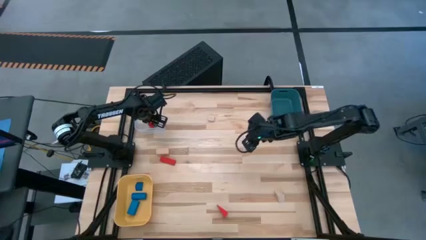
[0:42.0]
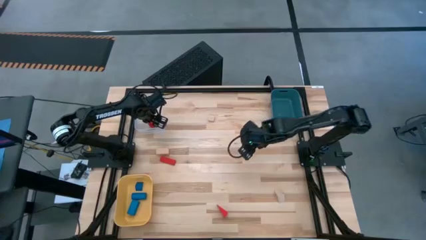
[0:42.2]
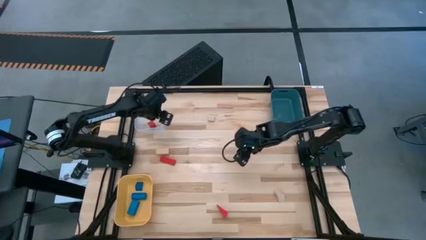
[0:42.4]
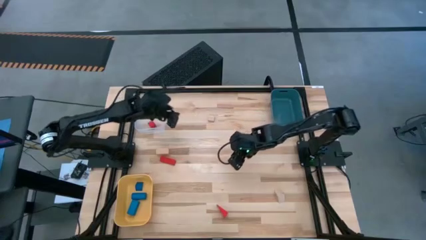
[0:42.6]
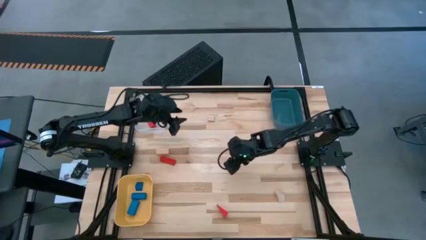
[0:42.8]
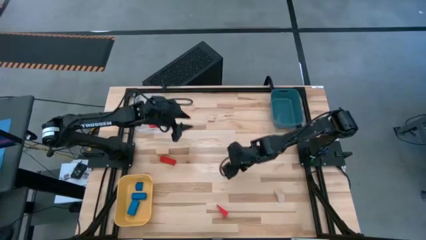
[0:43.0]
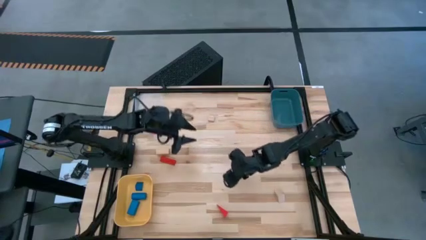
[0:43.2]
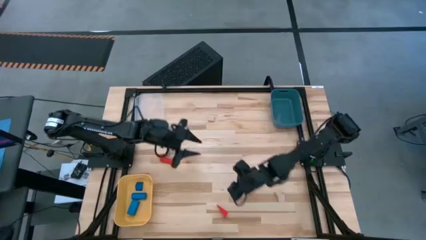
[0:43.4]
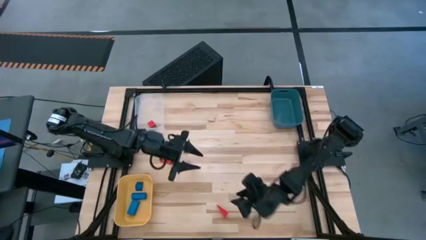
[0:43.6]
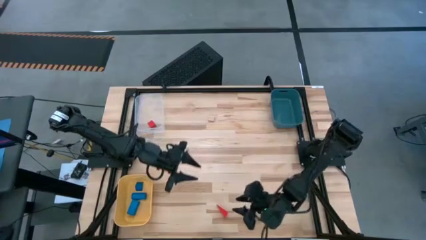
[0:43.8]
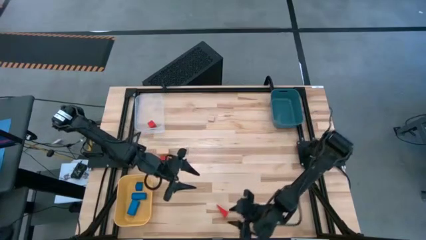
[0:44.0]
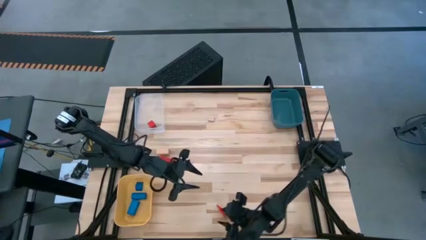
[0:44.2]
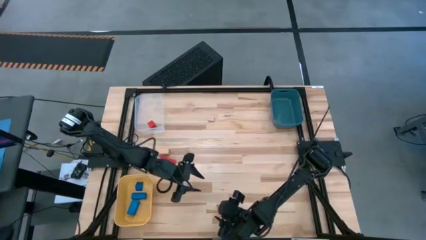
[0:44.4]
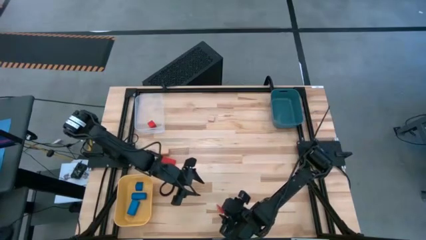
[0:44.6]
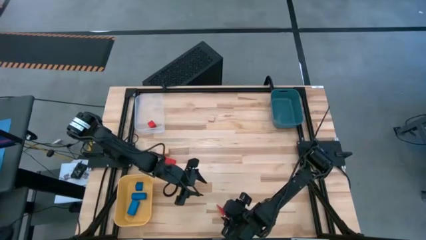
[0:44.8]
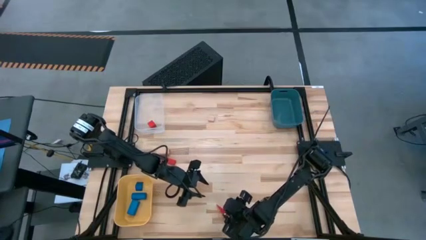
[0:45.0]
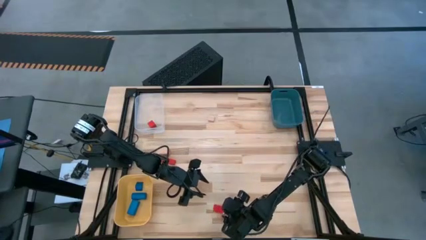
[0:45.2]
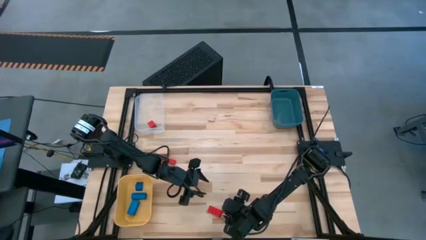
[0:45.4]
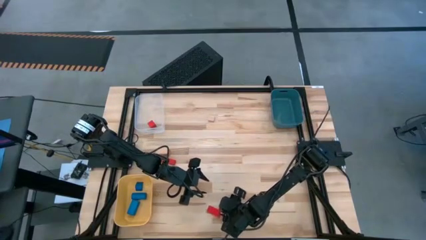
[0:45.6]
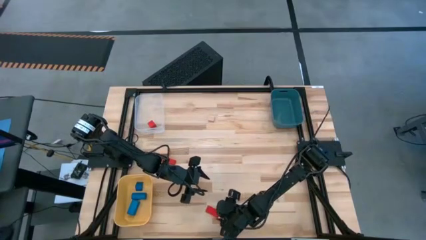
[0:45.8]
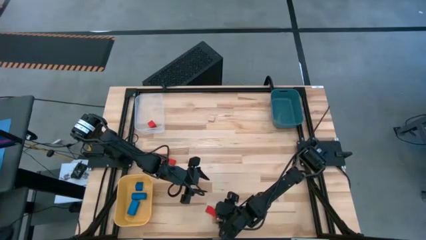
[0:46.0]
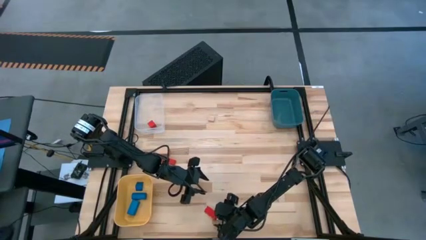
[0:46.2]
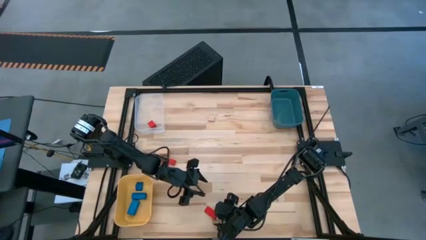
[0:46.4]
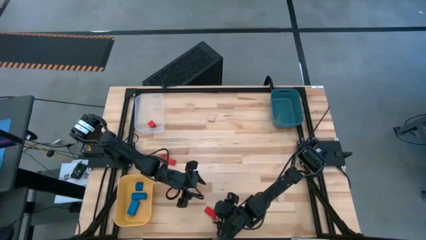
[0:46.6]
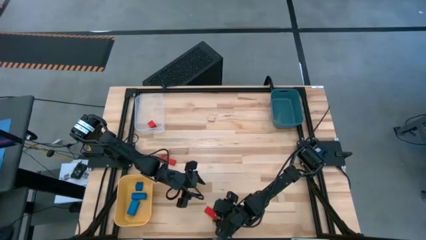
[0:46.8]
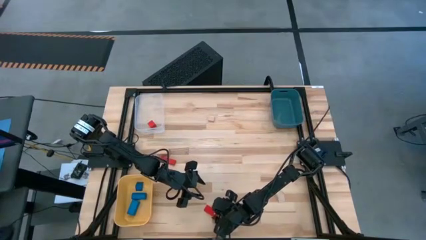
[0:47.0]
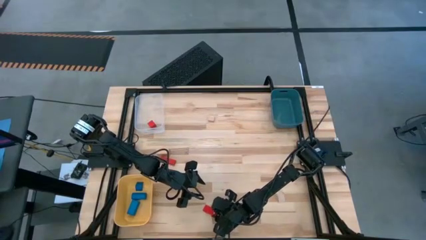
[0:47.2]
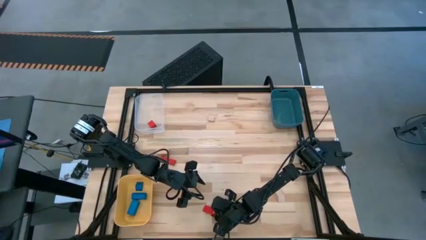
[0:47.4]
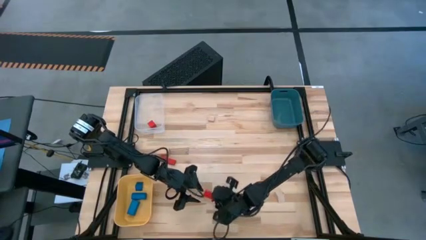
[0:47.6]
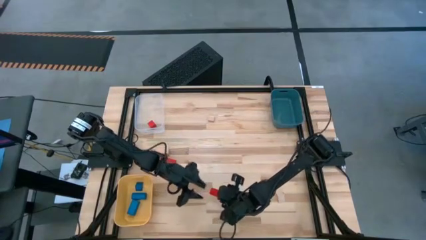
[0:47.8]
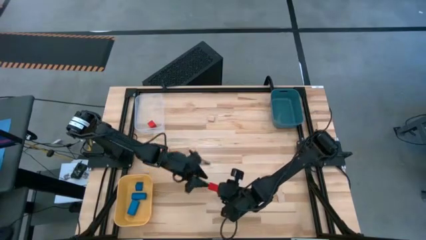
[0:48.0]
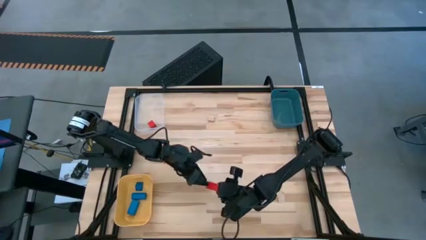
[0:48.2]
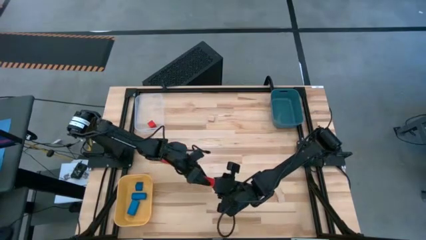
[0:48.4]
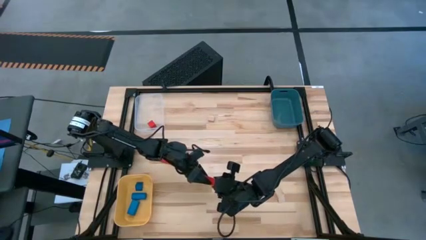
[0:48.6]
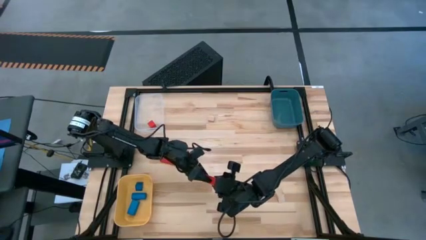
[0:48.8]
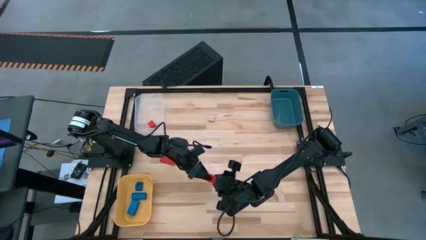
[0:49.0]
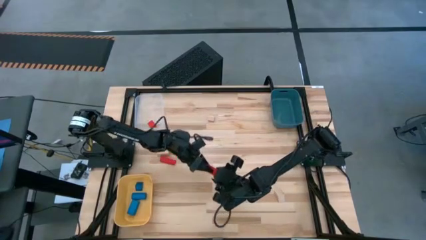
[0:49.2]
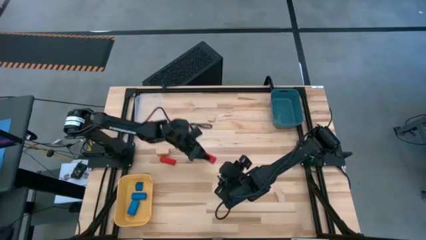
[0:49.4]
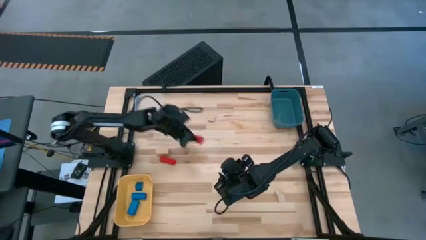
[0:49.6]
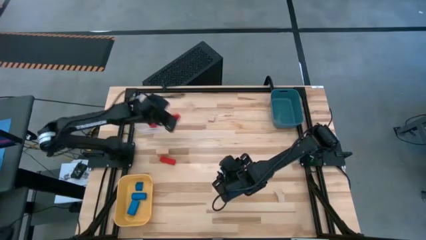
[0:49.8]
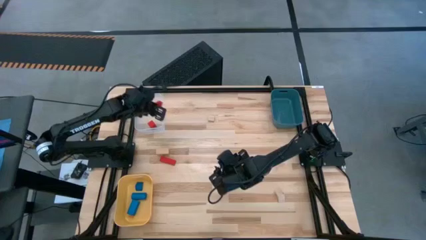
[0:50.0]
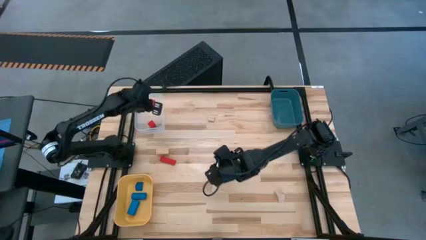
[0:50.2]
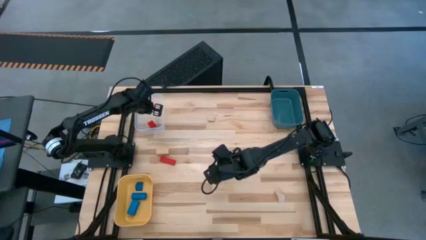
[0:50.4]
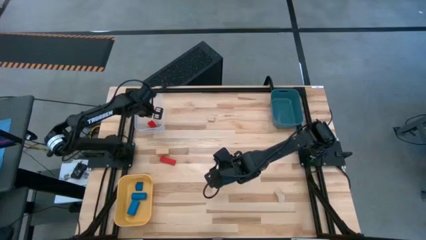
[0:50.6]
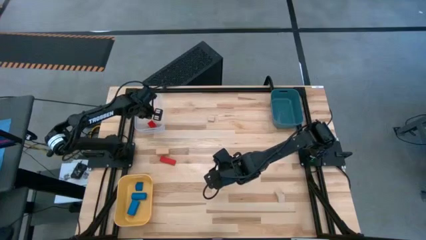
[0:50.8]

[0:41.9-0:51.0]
Task: Sort & place blocks by color
Put the bottom red block into the transparent bin

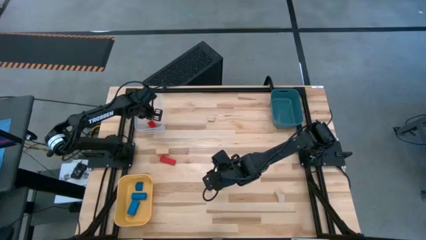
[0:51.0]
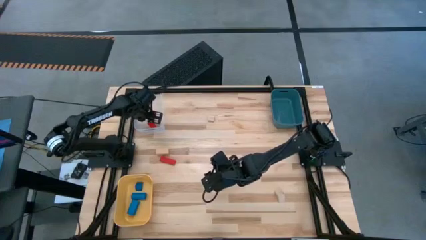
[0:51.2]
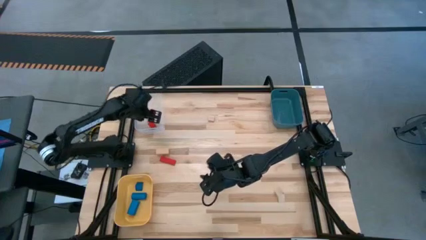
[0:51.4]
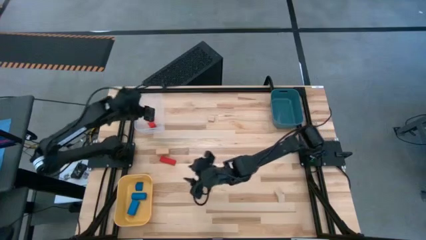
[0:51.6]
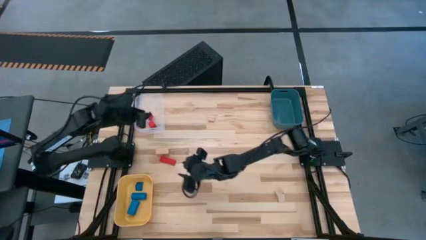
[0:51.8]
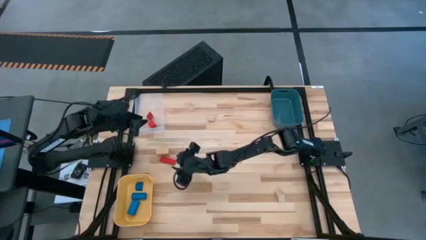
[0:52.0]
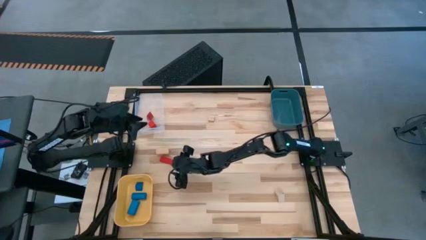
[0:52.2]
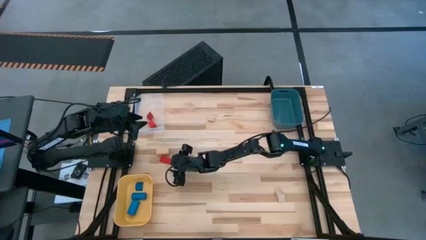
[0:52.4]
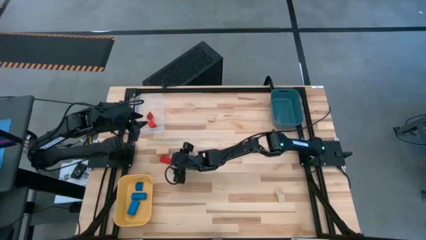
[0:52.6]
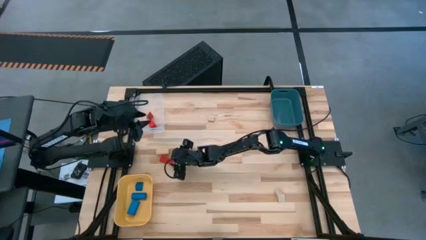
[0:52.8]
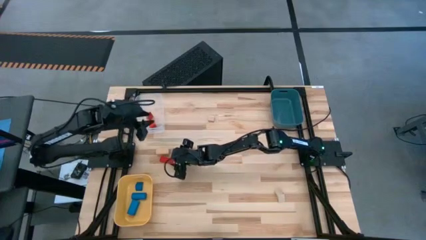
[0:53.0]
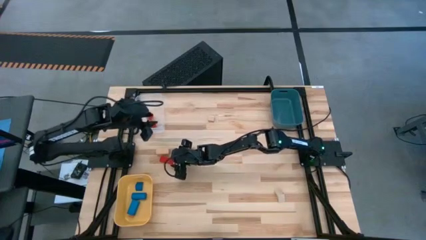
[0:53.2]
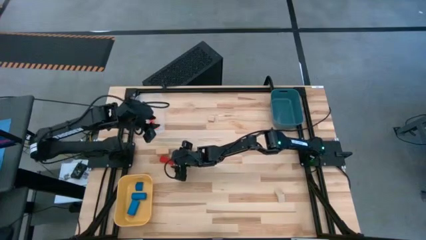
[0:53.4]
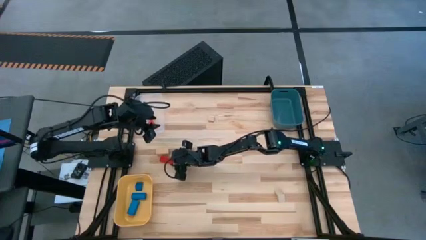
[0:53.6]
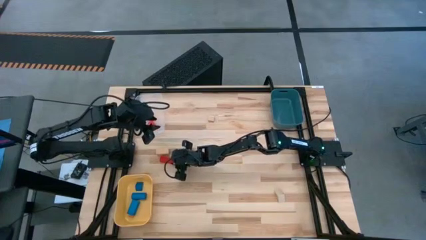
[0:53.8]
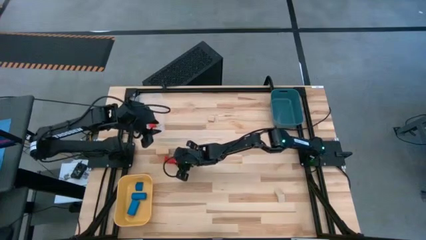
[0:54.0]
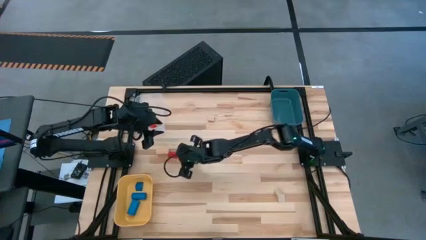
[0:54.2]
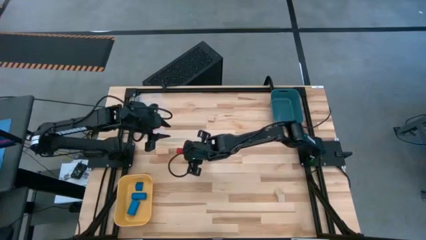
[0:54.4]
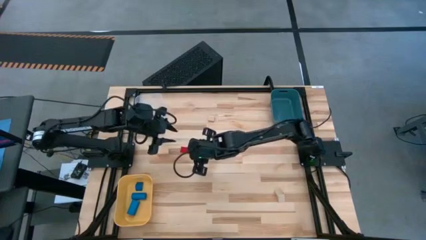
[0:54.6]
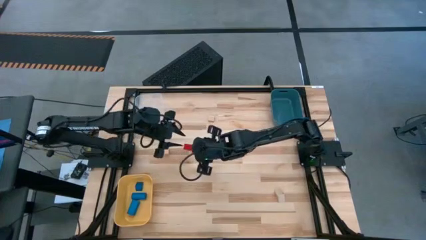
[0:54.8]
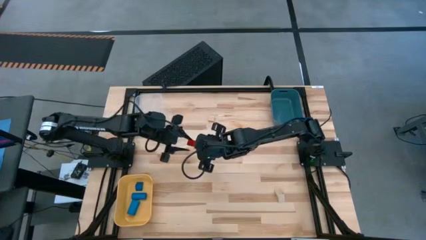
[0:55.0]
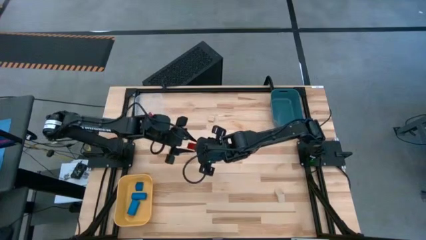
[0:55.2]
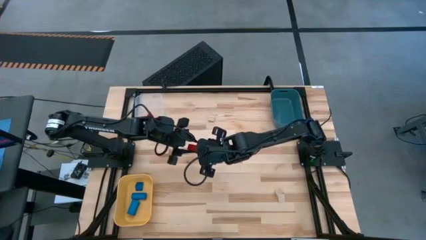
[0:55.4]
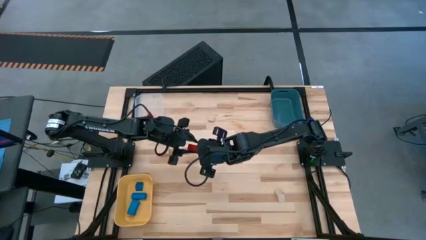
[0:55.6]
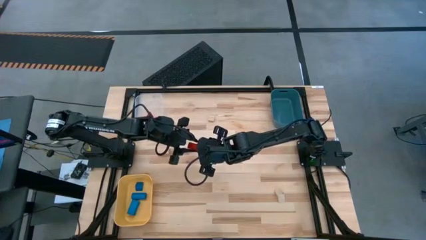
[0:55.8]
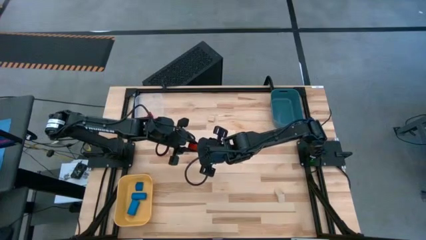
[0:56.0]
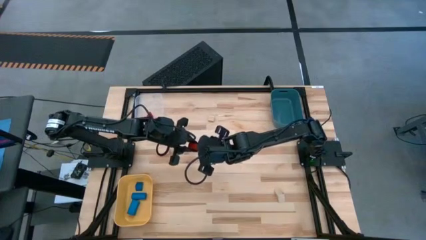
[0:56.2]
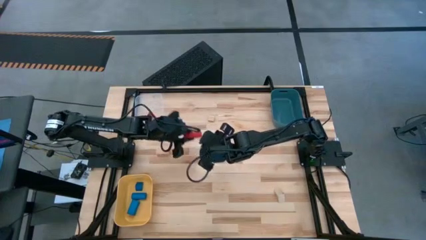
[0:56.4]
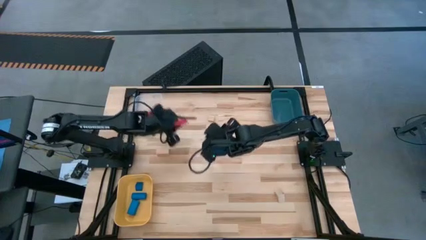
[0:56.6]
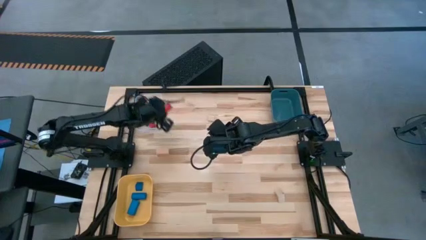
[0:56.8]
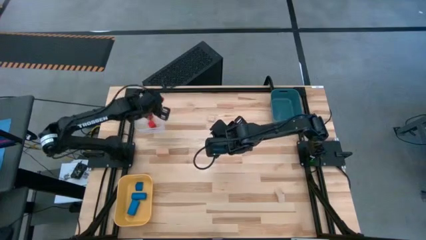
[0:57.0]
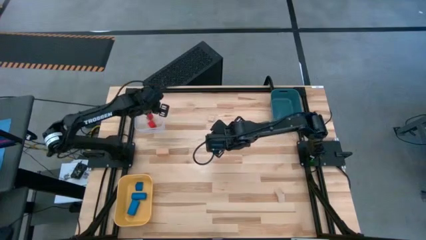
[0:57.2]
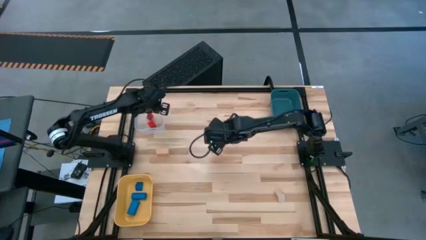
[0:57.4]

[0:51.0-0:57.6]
Put the red block into the transparent bin

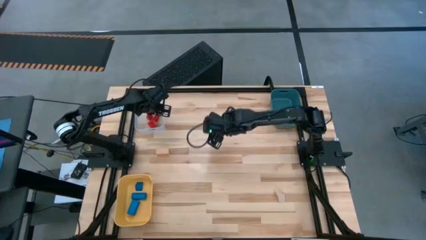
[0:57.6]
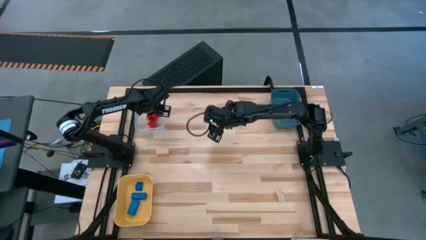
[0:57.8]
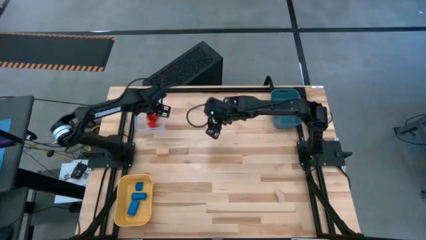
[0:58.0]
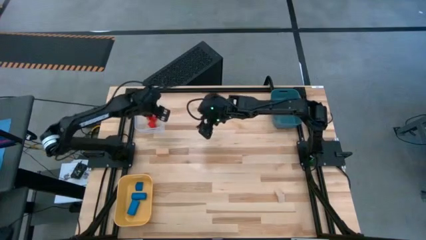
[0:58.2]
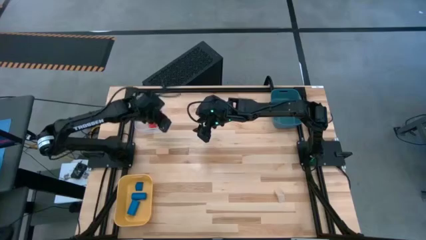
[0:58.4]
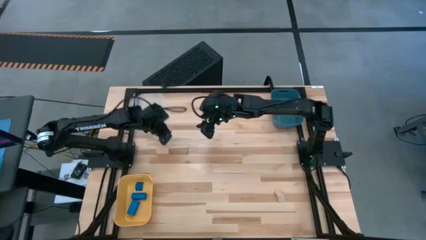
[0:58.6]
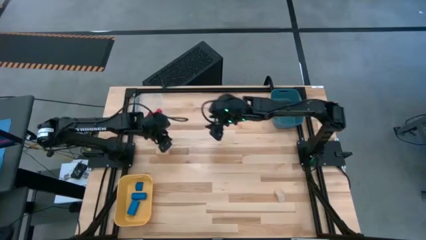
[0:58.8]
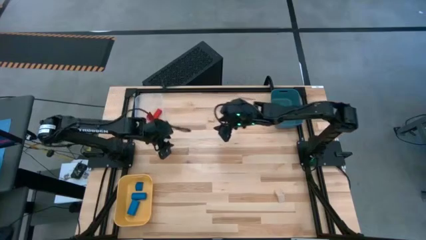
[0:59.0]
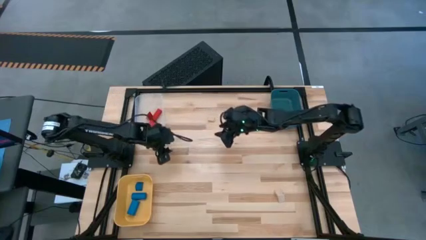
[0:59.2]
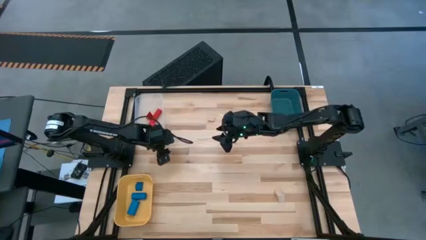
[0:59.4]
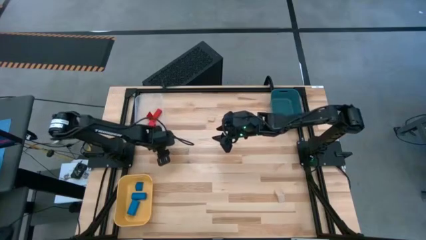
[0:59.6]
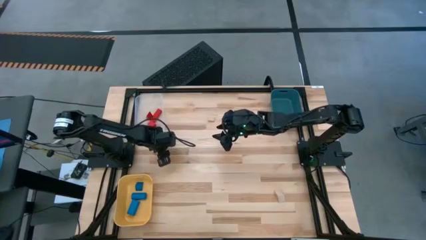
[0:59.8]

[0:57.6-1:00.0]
Put the middle brown block into the blue bin
